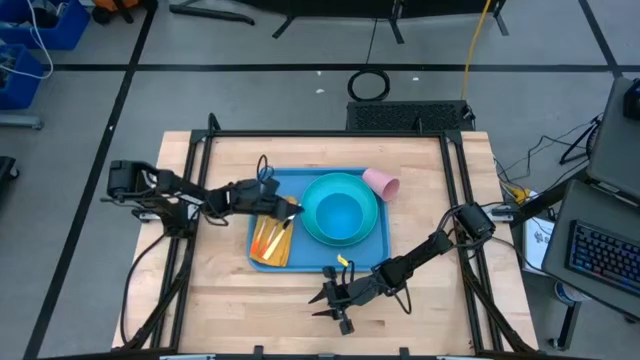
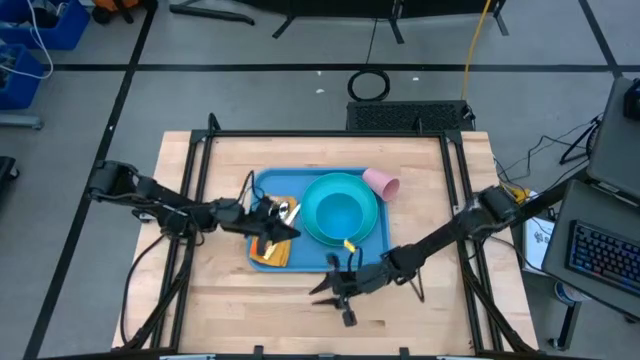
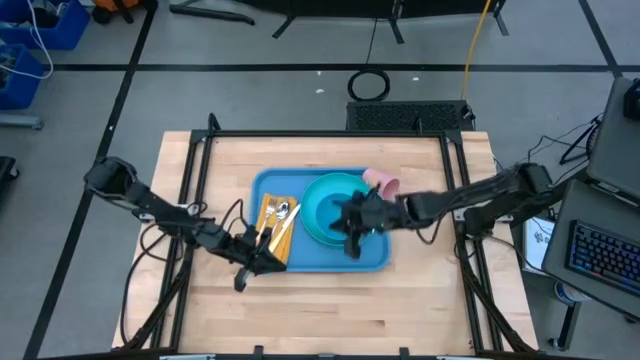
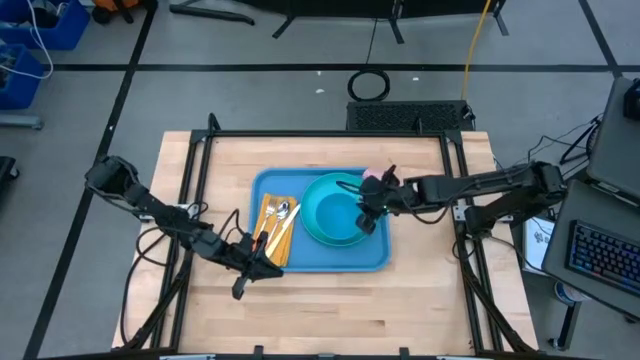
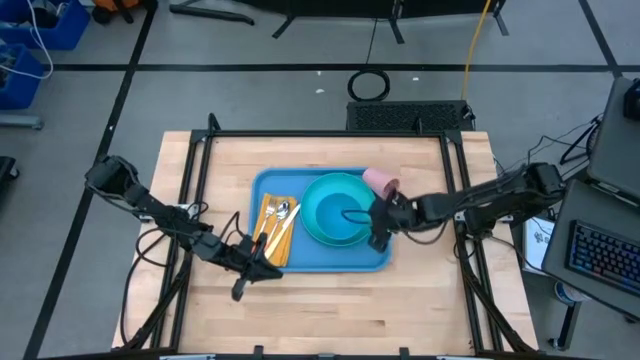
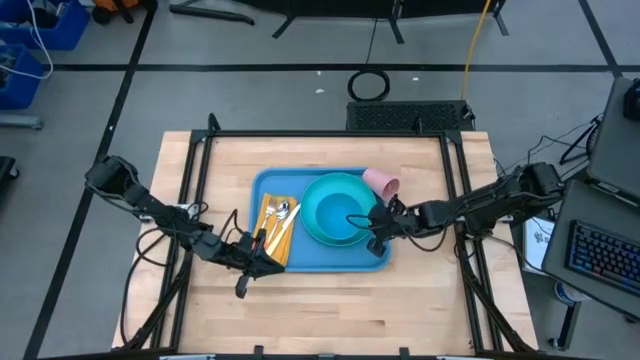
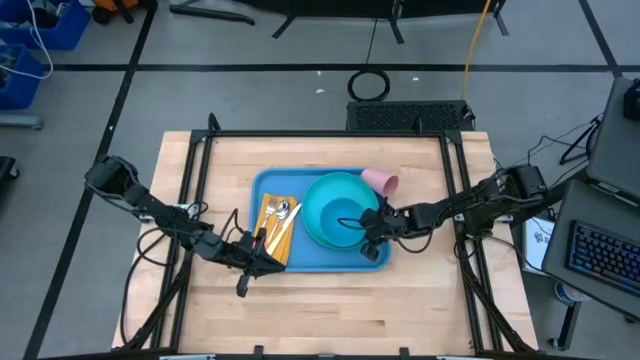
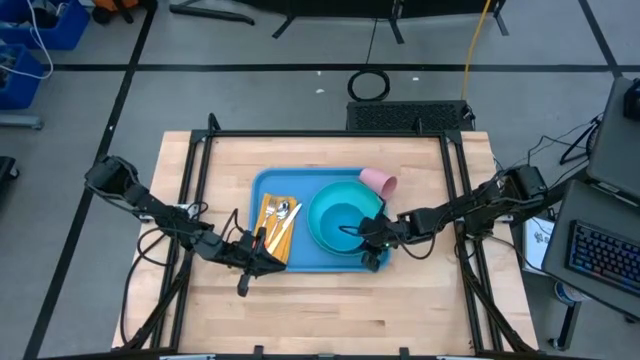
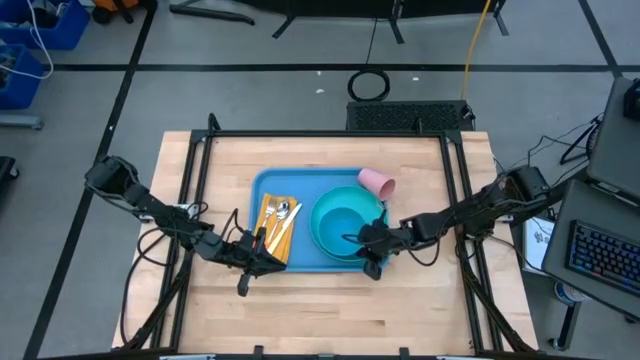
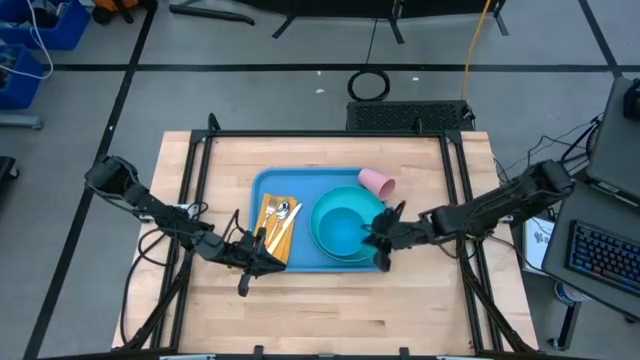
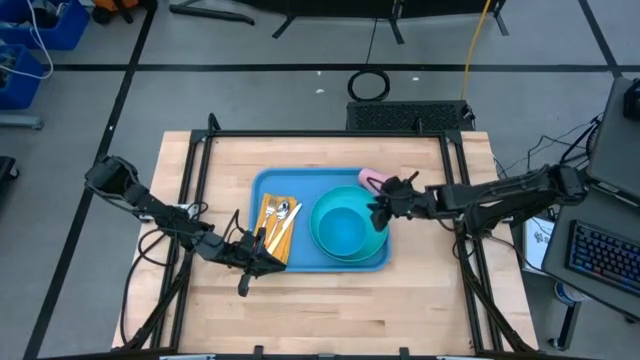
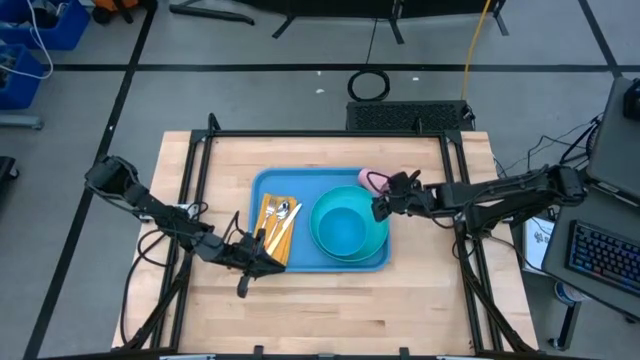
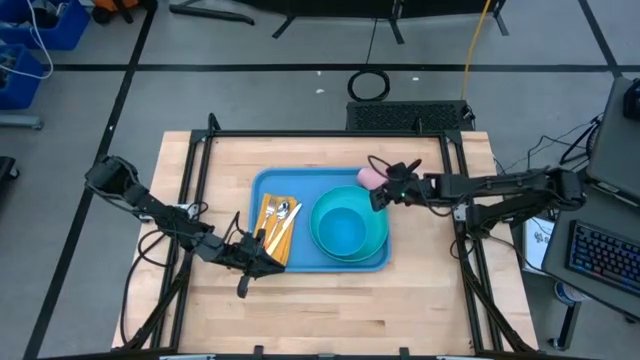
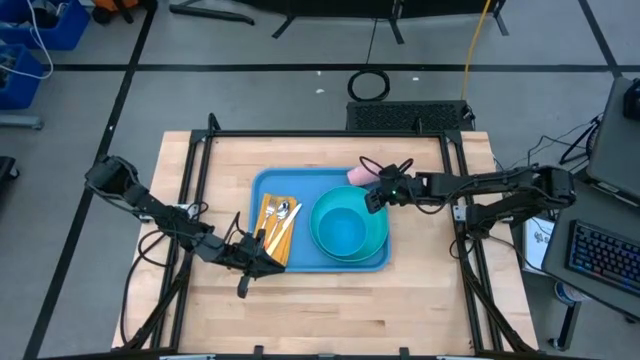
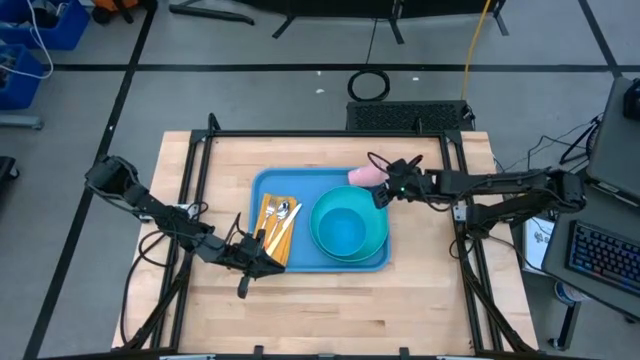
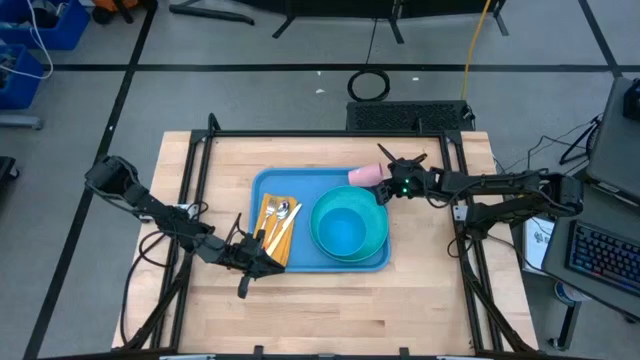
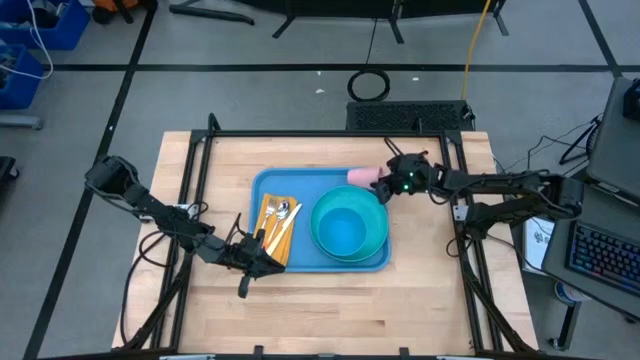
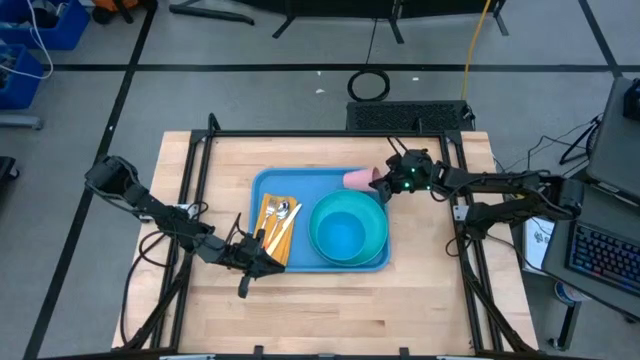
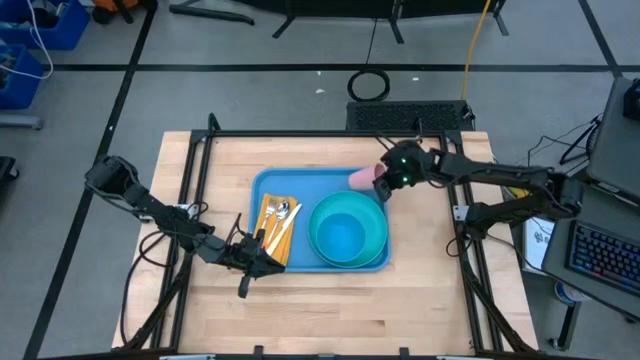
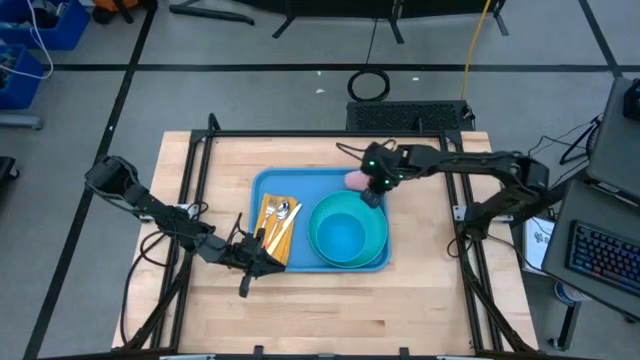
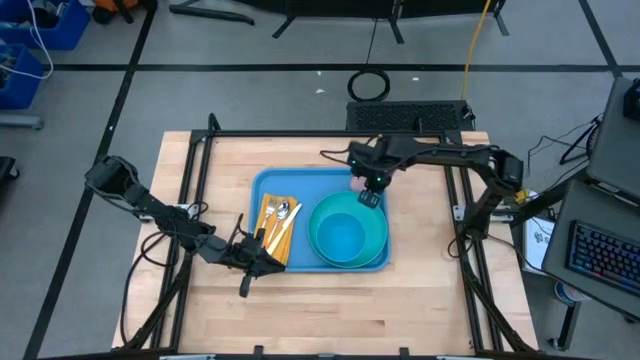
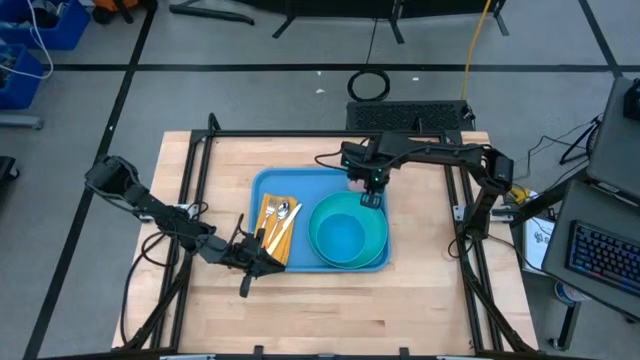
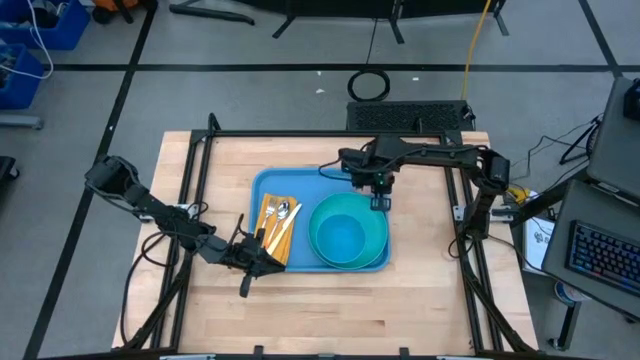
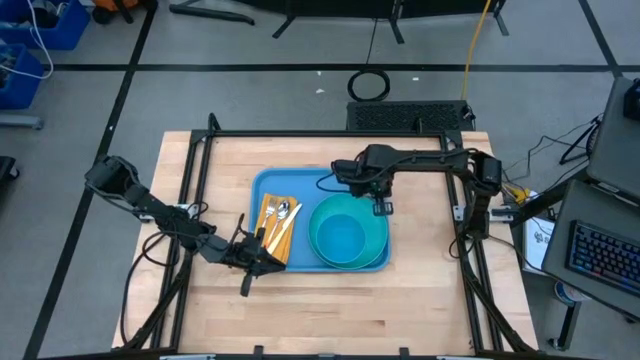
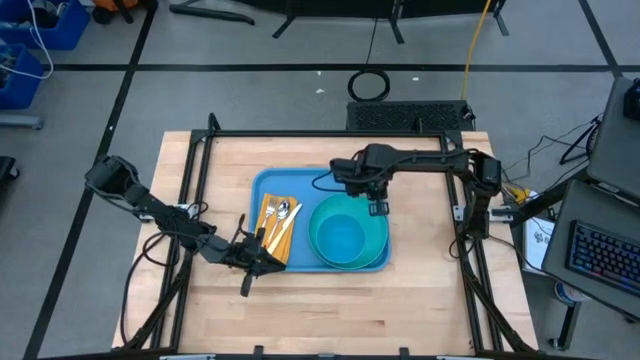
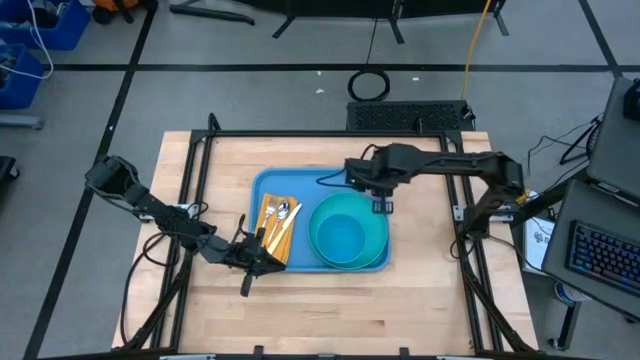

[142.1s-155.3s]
Task: Set up tray
Adjust the pink cup, blue plate, blue bowl, blue serving tray, and yellow knife

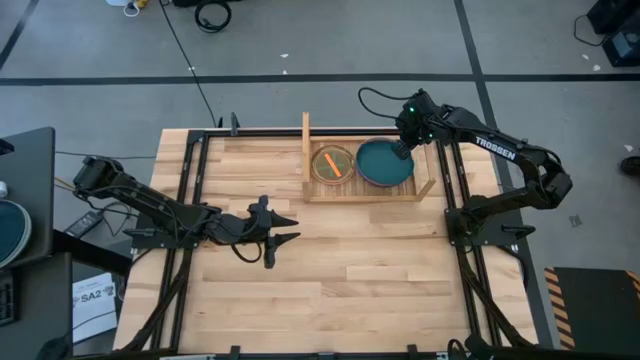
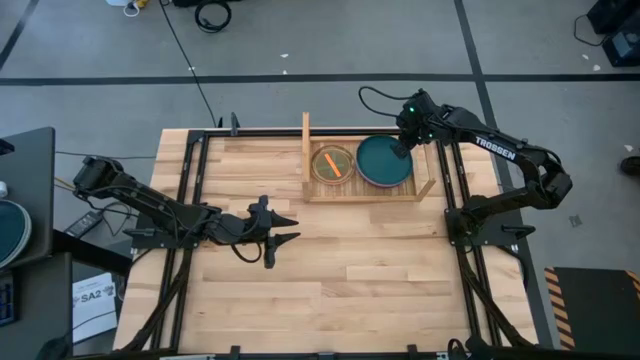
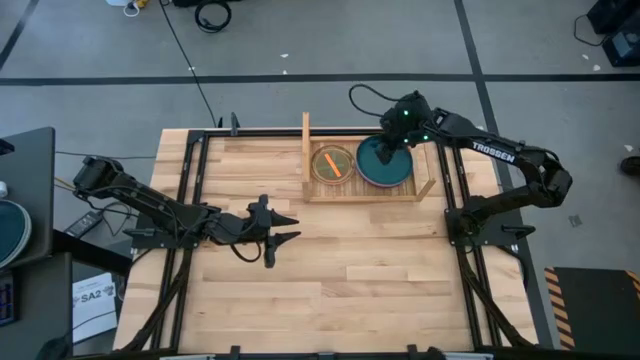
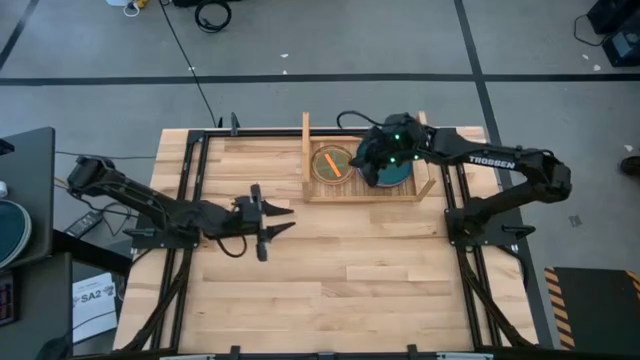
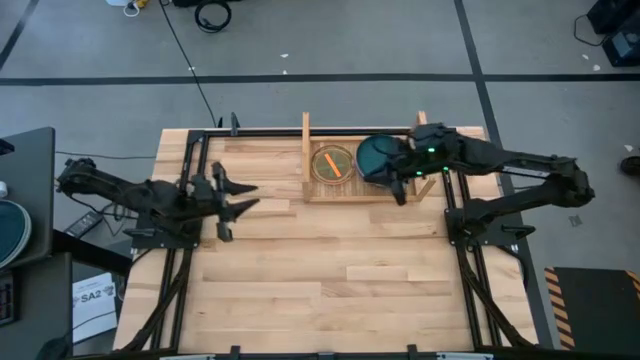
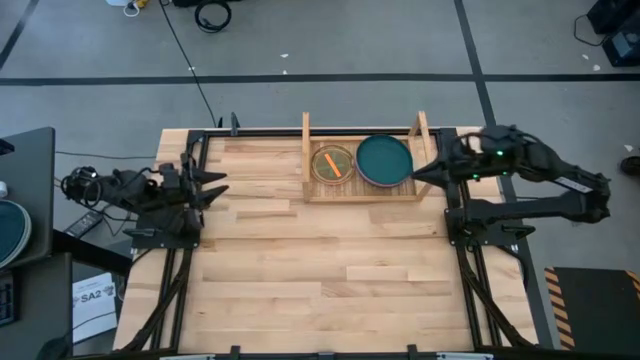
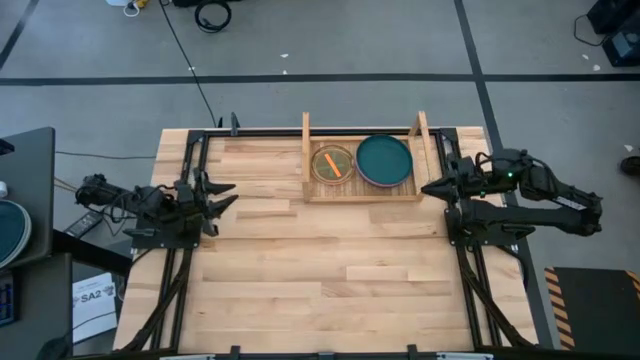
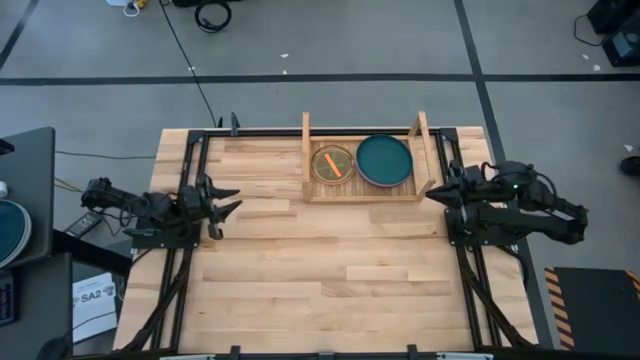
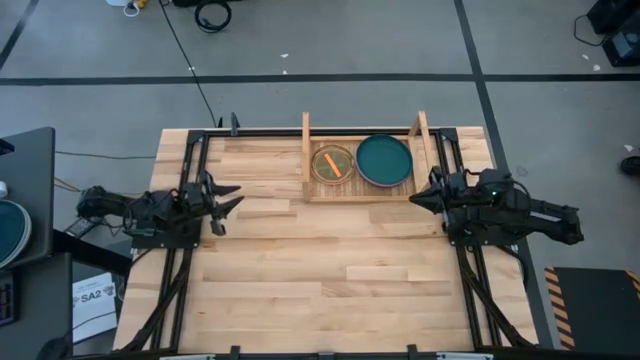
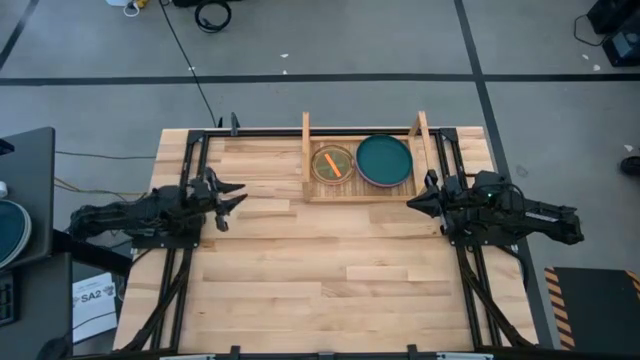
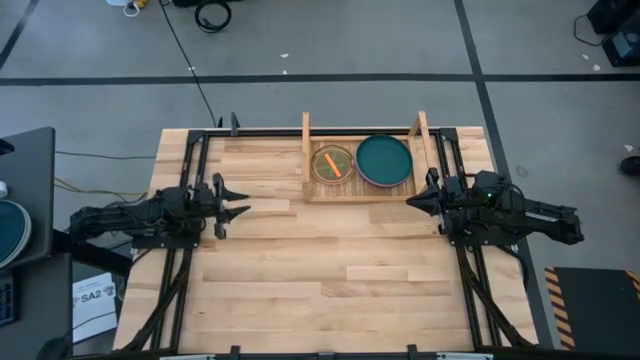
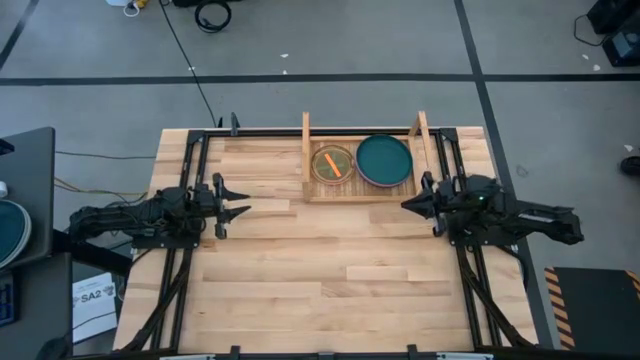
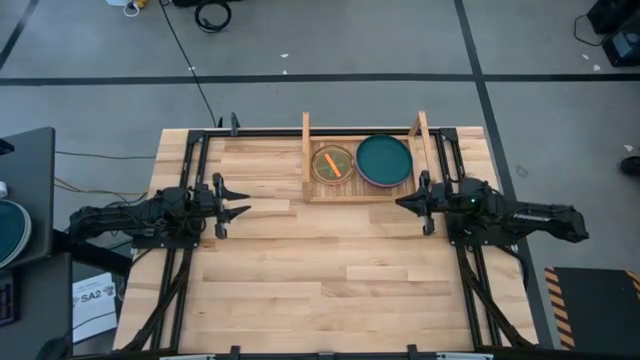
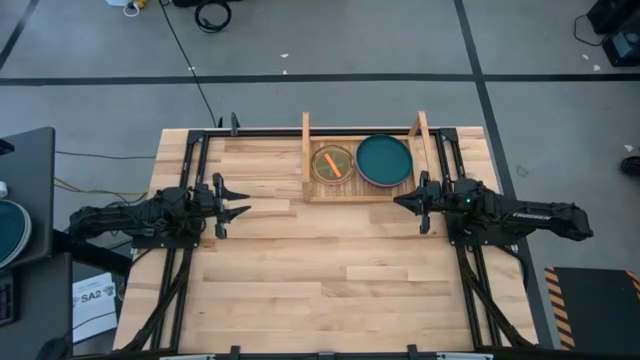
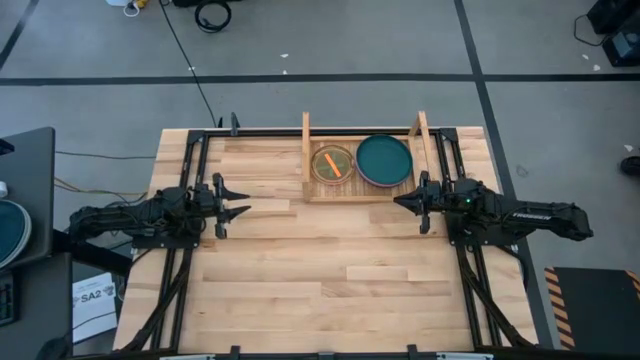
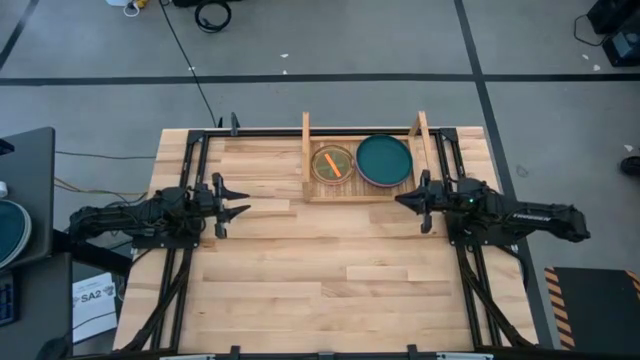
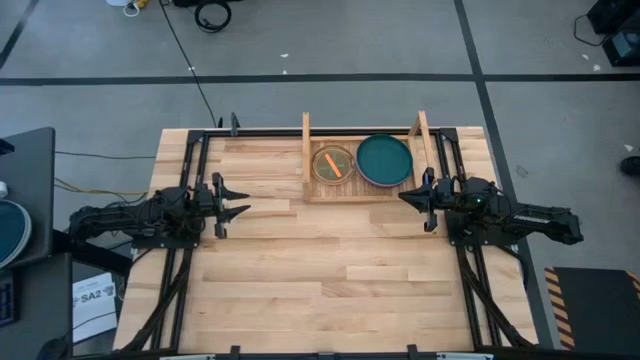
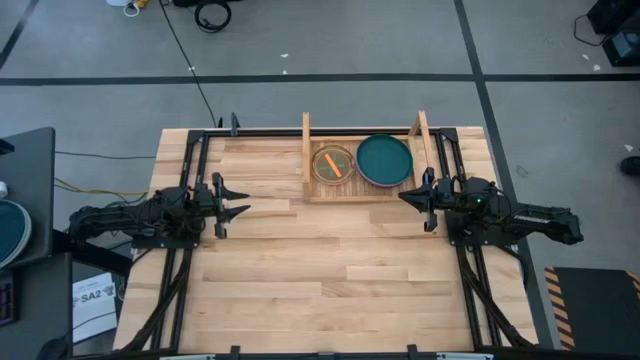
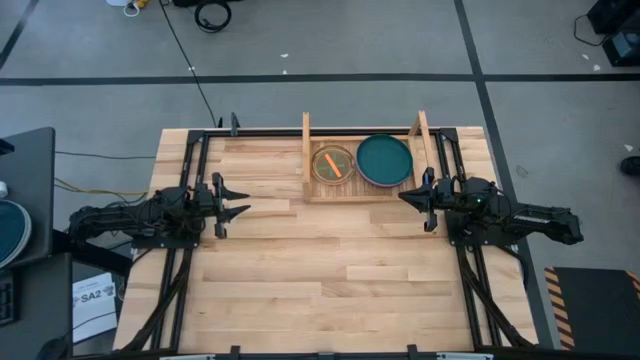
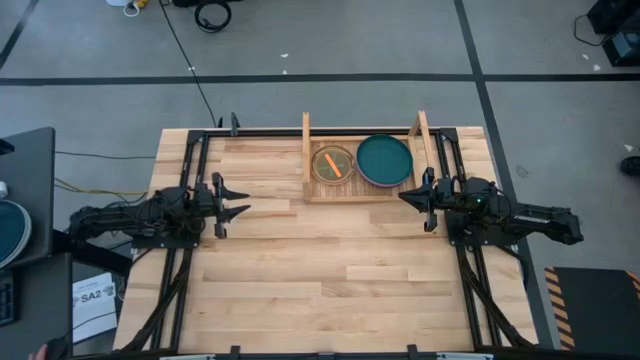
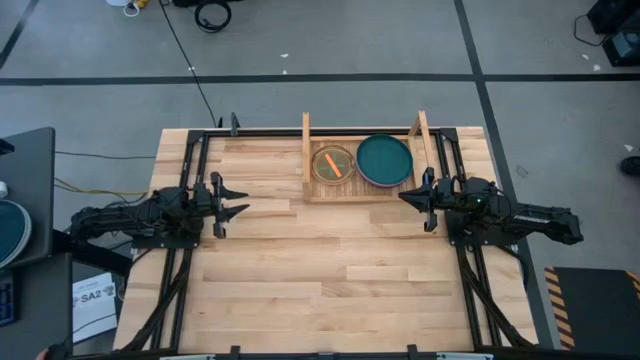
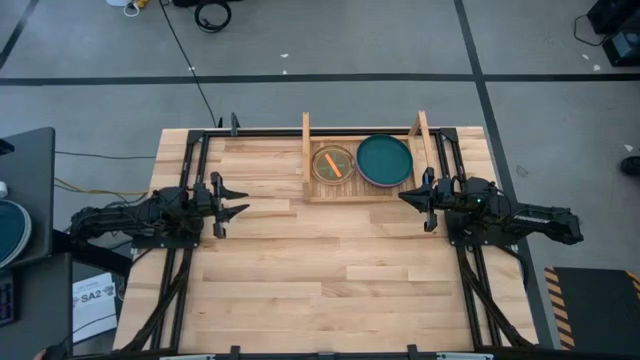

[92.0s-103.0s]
Task: Place and stack plates onto a shelf
Return to Home Position
